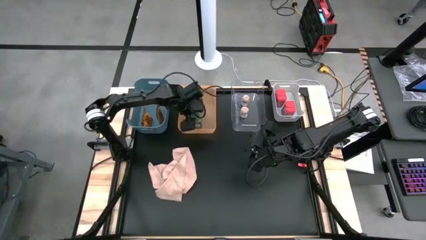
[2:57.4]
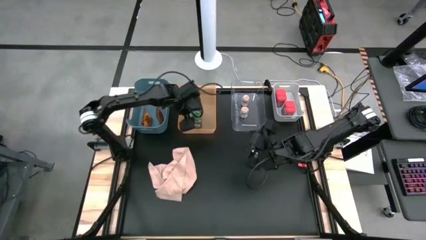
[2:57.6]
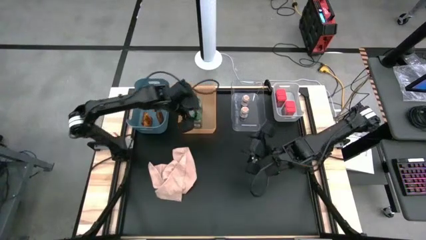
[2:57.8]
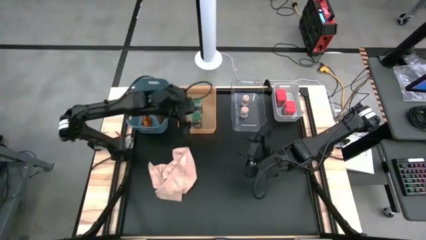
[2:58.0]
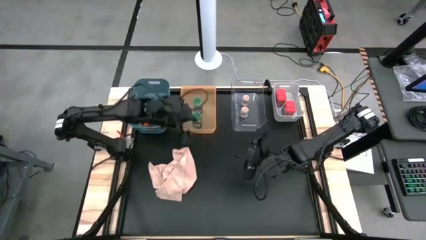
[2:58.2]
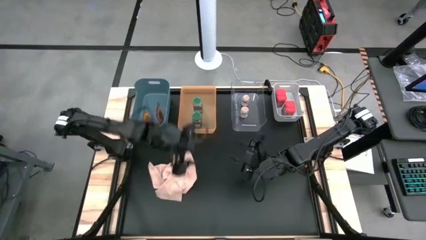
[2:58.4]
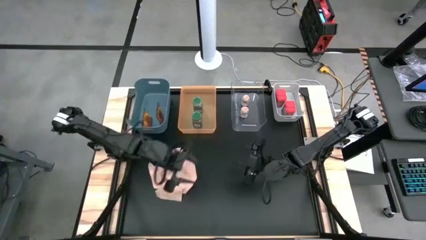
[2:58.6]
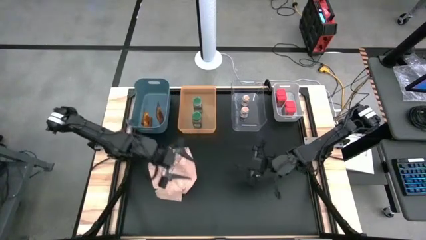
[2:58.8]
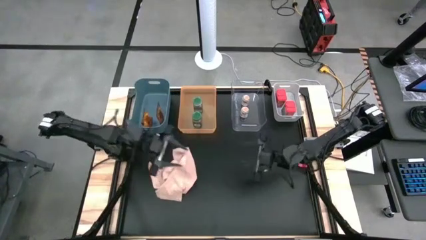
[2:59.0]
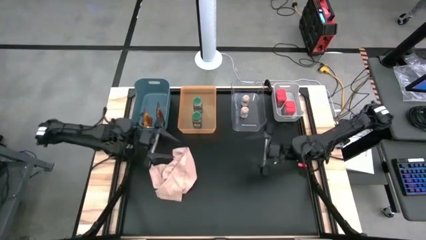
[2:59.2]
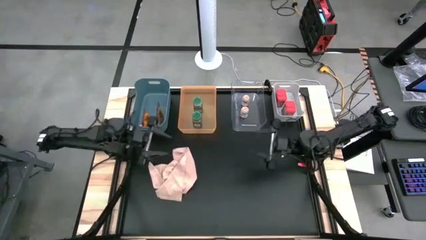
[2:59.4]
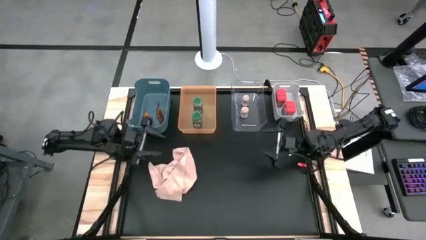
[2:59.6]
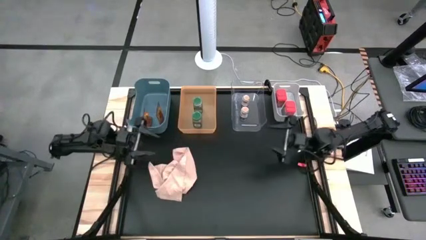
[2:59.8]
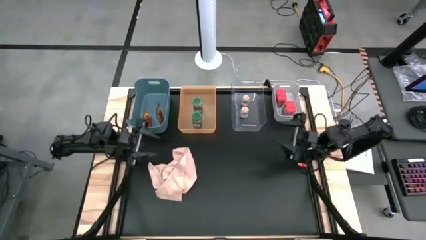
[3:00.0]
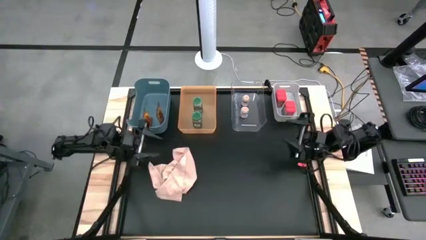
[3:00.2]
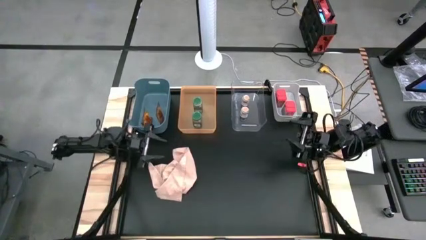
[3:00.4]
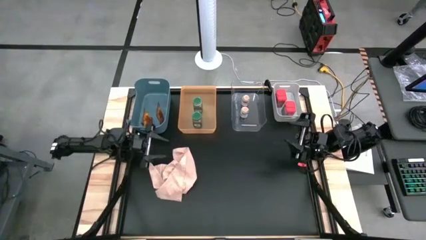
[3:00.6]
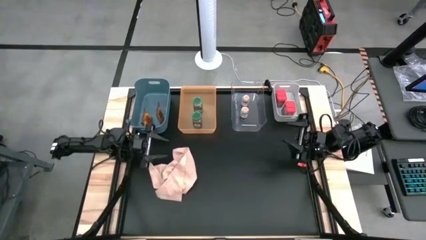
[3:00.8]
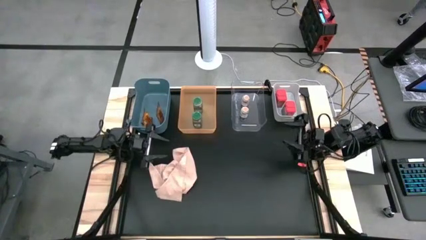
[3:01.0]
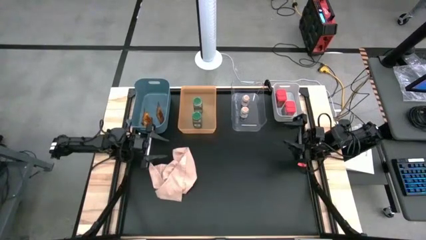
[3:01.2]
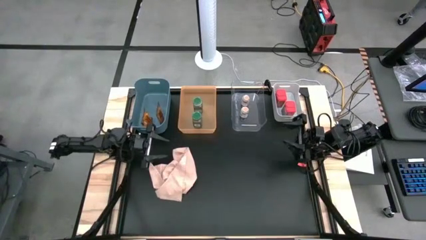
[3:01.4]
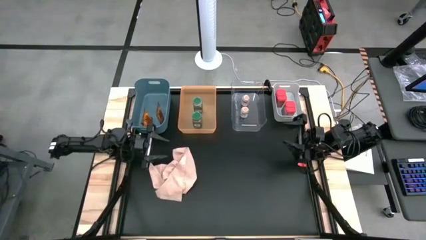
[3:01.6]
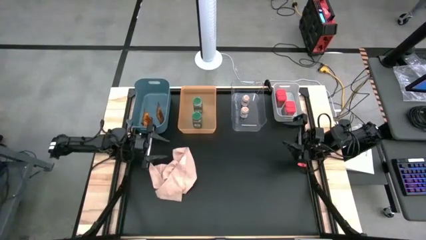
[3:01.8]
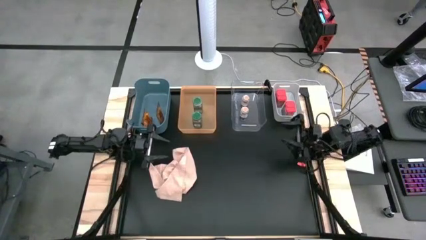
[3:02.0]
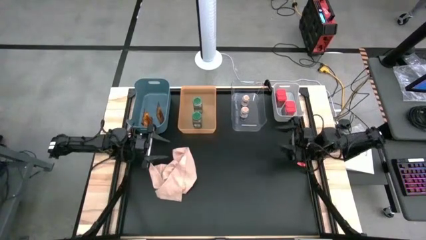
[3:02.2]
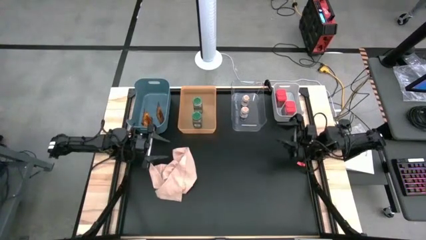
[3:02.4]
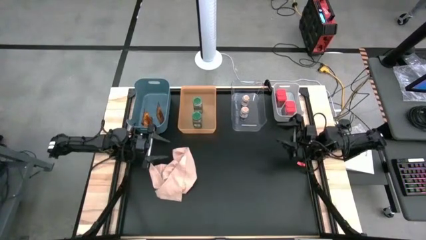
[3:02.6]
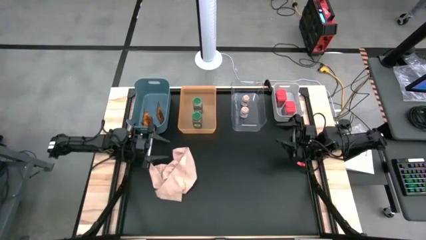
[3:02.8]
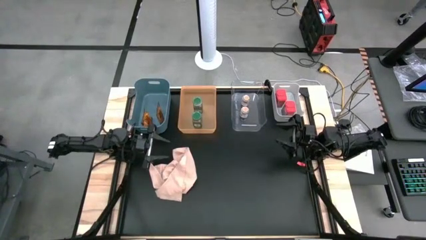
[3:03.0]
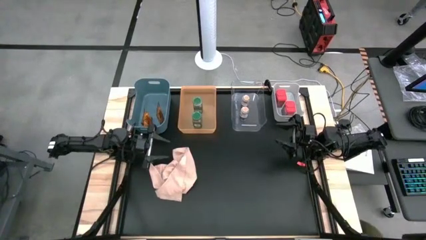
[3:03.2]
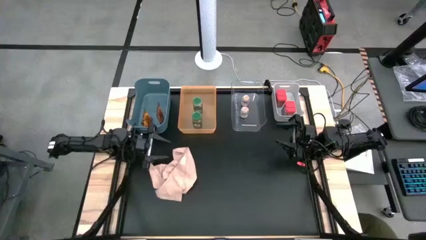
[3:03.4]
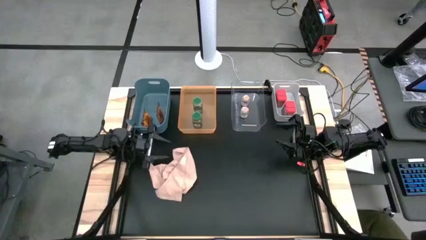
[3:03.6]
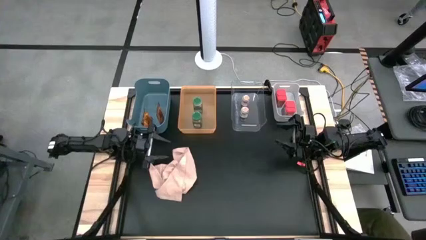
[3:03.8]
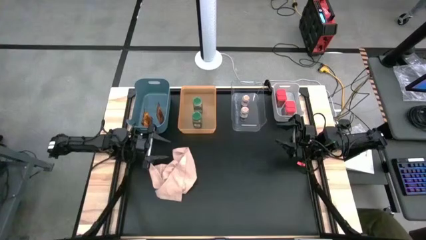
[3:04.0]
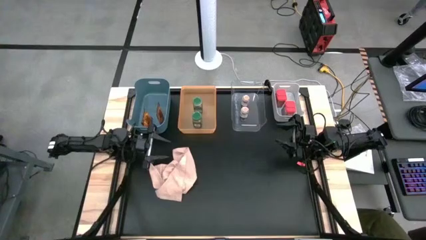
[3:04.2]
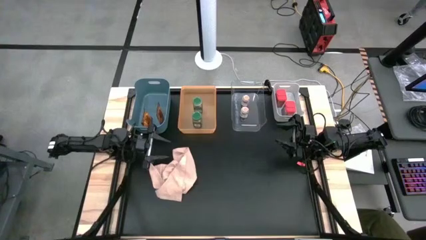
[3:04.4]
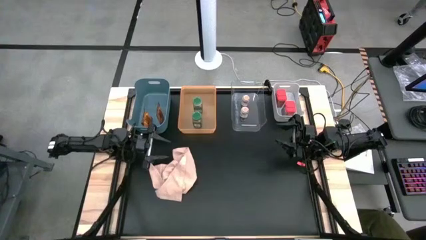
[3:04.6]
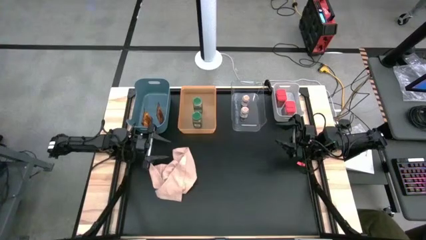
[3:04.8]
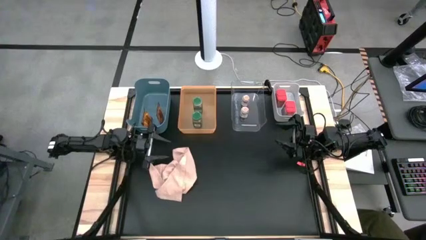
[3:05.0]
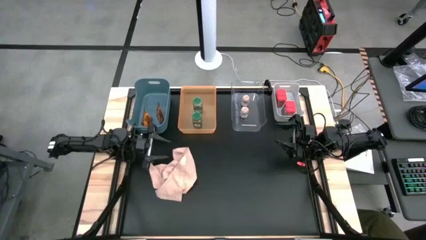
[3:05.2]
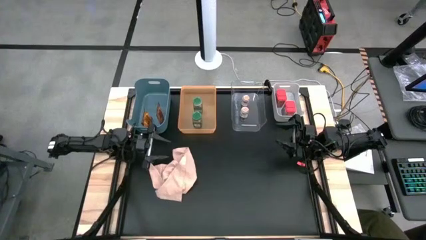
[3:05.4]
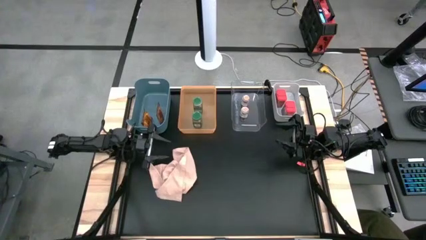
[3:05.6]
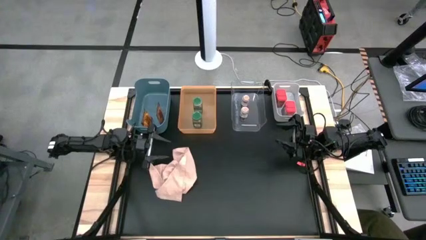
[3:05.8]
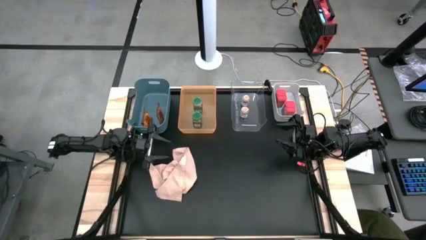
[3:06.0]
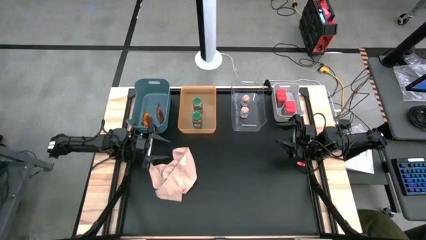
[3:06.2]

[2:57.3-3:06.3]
Task: Sort spices by type
Return to Home Position

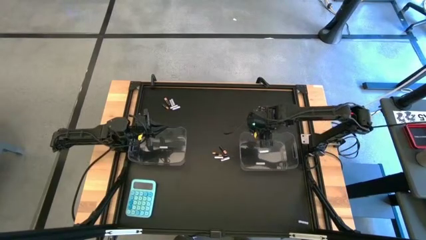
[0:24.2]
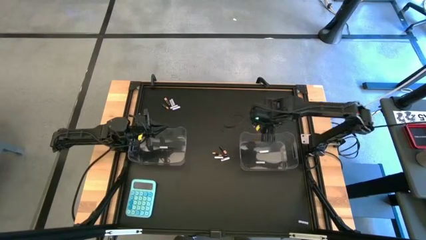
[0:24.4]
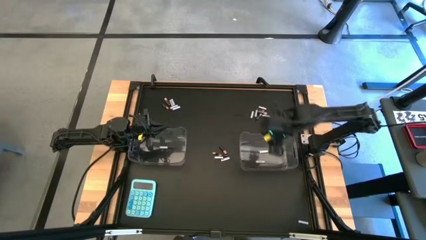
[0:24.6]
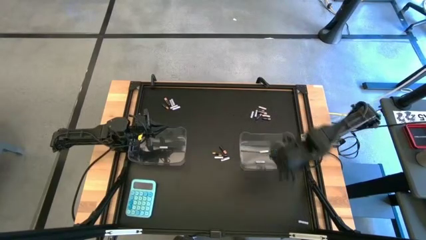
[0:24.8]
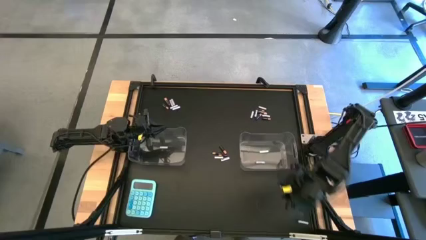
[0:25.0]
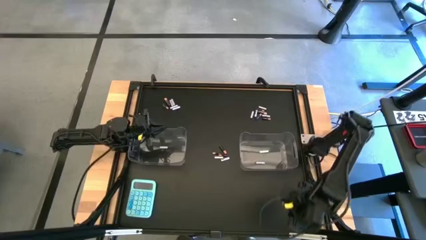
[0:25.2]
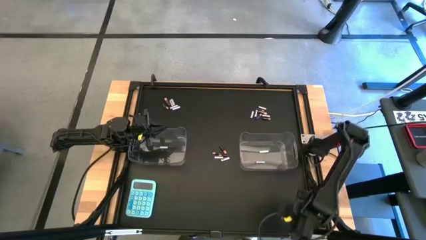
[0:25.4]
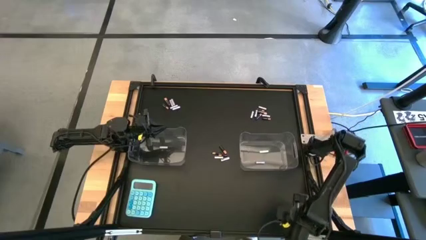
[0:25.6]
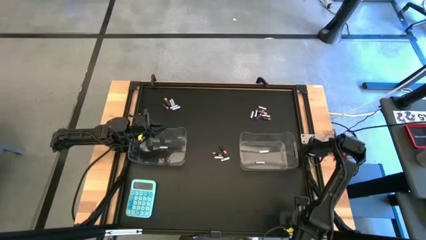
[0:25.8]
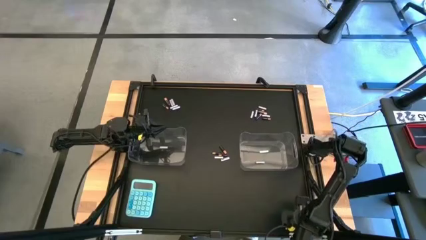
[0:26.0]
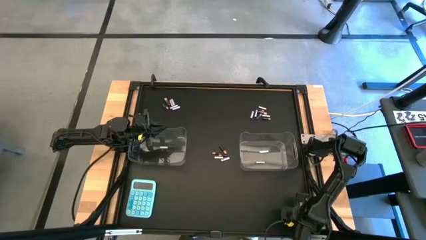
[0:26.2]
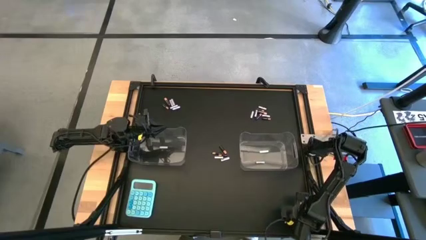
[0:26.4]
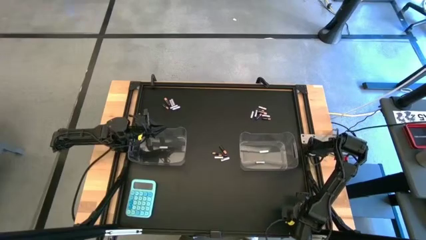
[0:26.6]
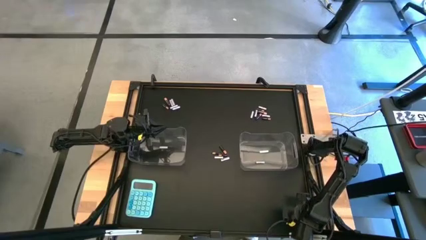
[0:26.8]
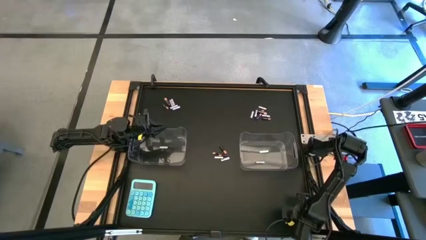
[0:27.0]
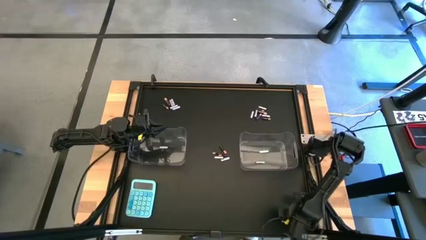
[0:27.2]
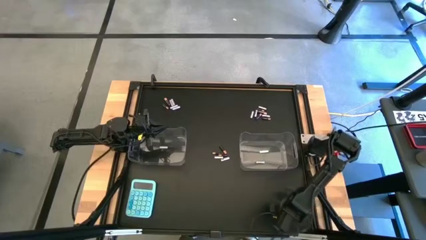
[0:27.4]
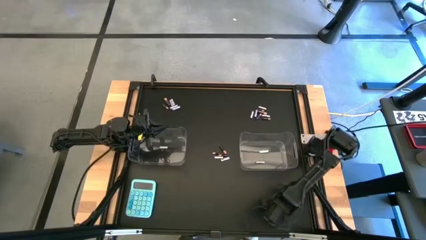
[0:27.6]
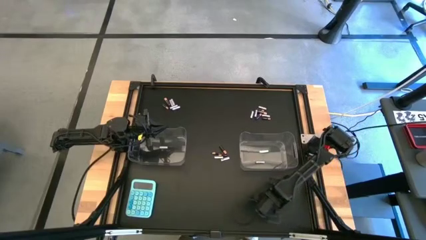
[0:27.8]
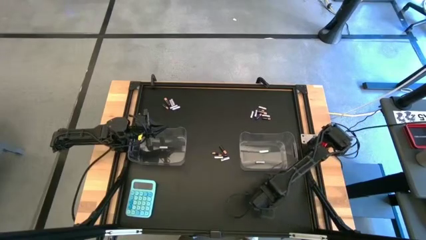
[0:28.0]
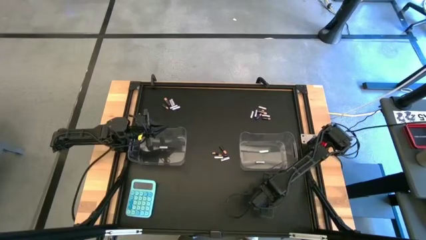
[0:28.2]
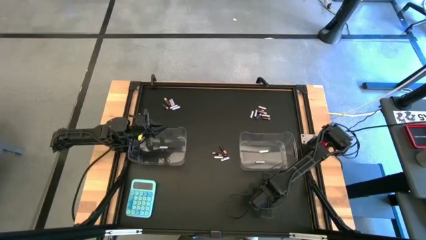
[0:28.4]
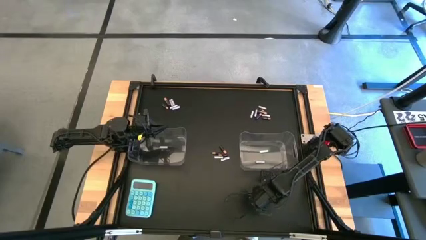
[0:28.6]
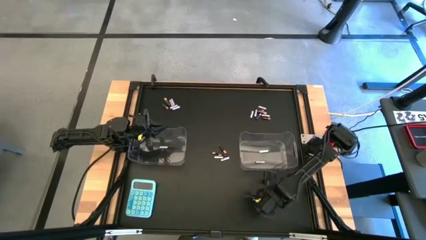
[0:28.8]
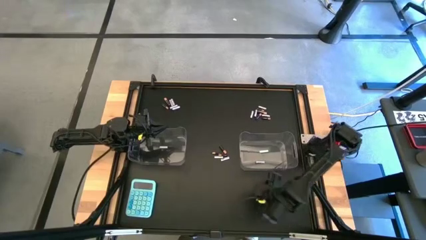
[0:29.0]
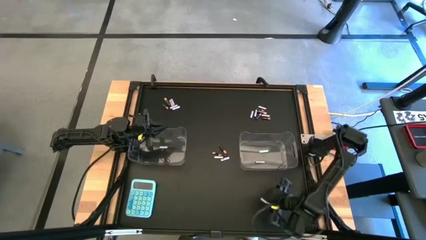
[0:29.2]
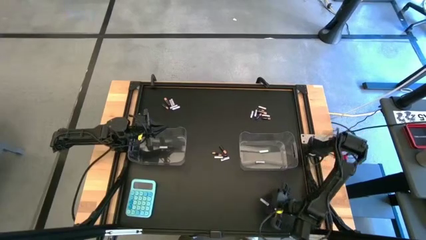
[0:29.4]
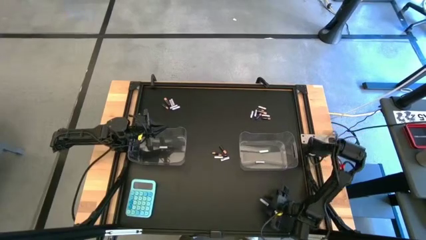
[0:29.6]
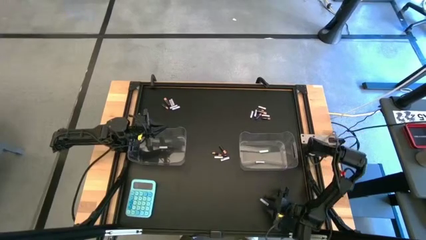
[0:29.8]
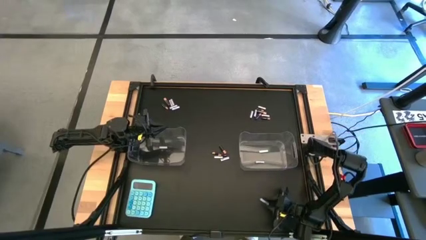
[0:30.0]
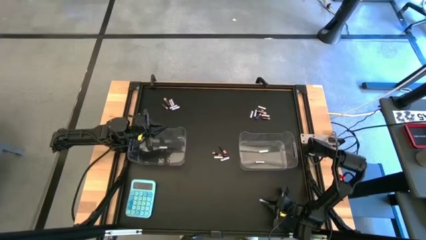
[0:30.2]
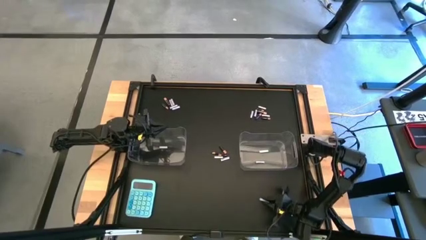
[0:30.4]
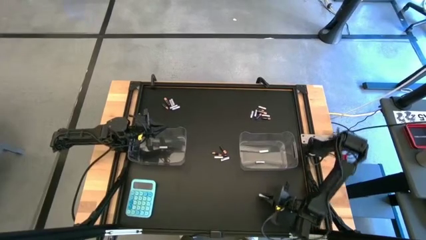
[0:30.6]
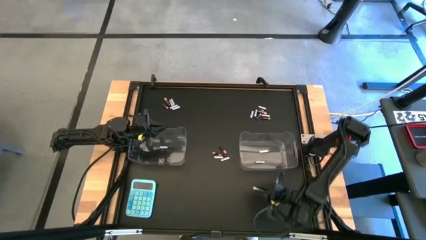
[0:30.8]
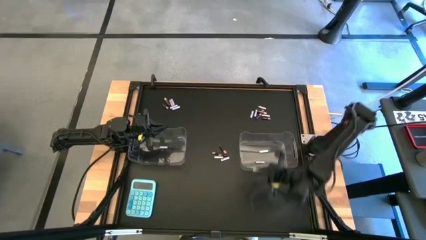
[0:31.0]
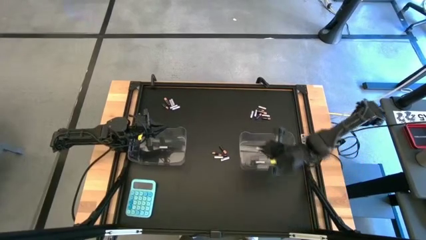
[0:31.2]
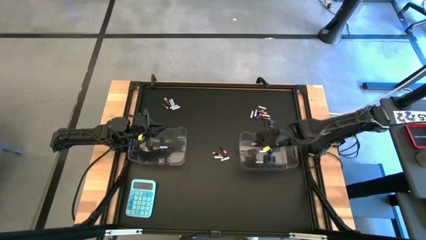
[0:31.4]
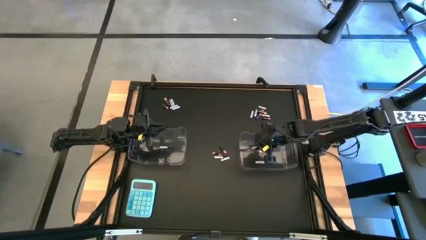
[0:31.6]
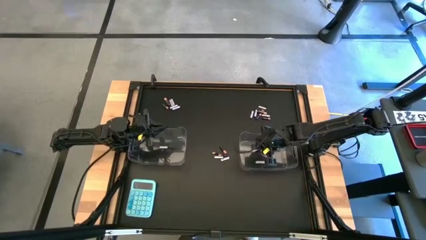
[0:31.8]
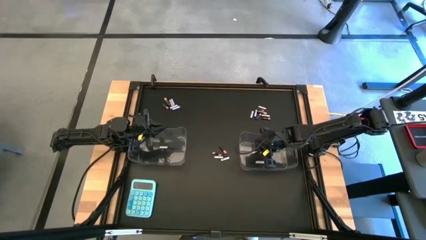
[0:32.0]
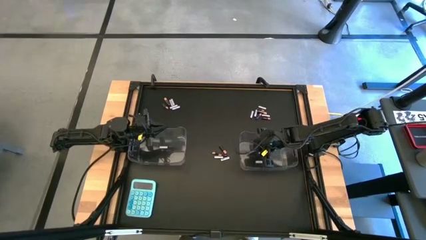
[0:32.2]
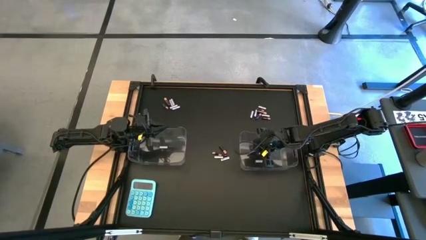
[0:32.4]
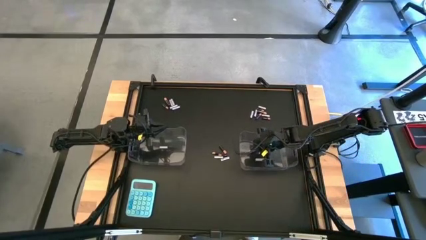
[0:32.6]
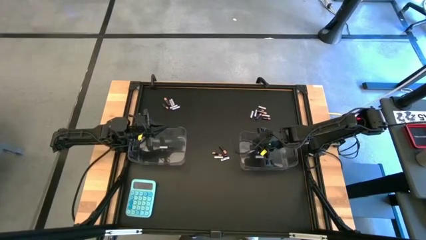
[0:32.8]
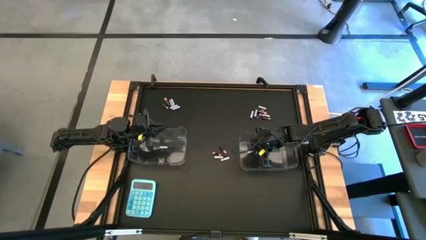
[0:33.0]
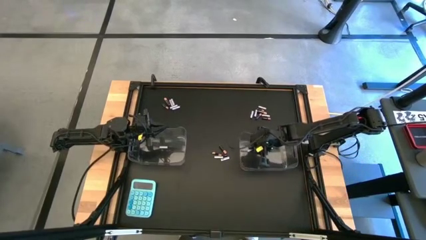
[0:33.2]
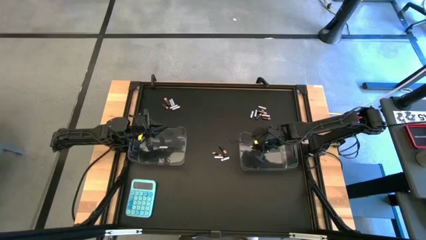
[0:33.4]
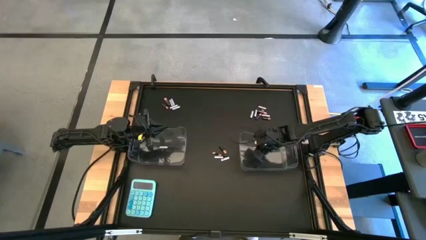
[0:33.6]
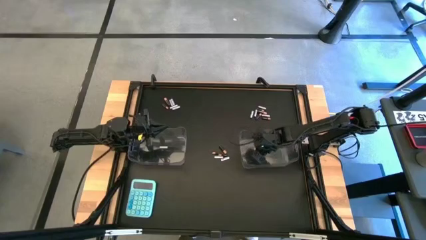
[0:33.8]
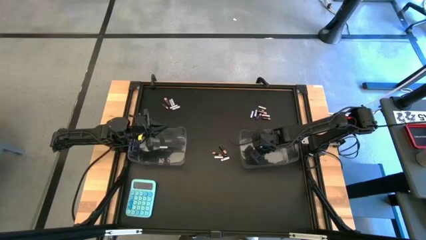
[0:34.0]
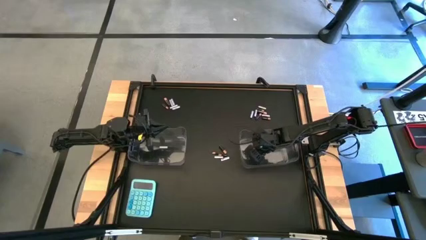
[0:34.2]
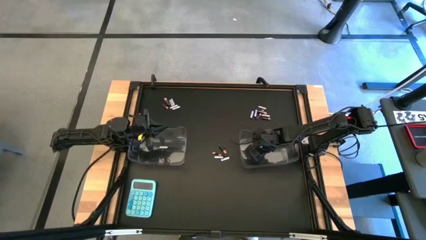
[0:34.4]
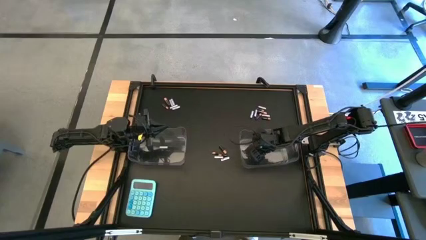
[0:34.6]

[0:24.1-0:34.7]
Task: Sort batteries
Put the white battery into the right transparent bin
